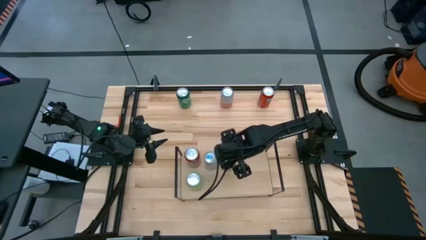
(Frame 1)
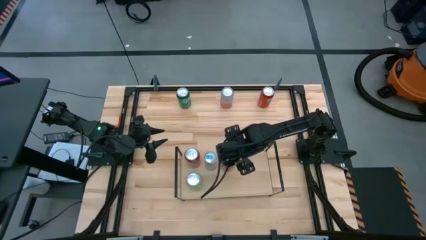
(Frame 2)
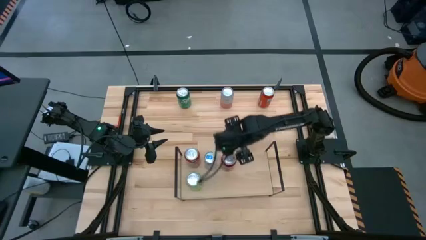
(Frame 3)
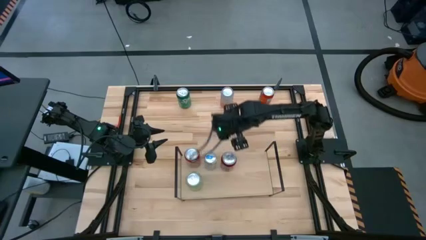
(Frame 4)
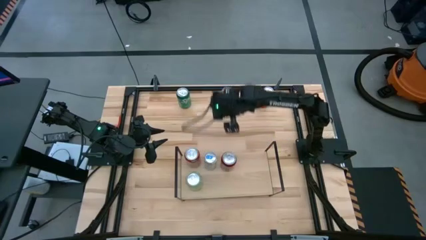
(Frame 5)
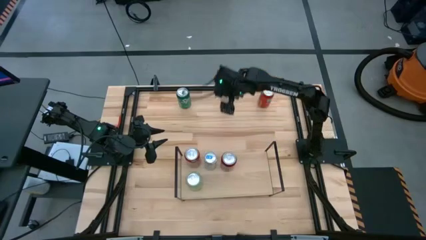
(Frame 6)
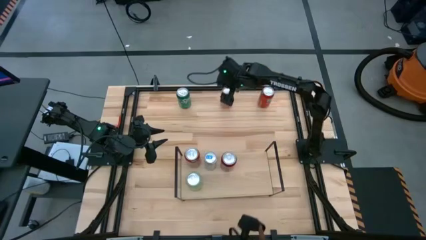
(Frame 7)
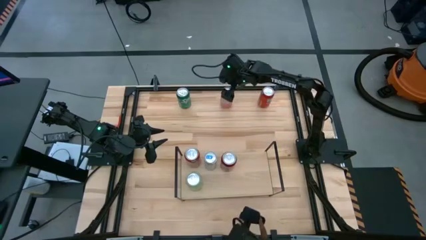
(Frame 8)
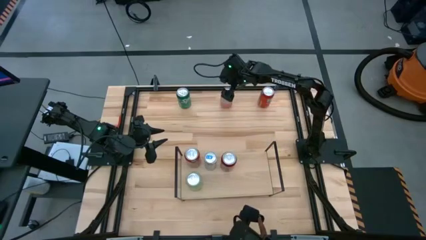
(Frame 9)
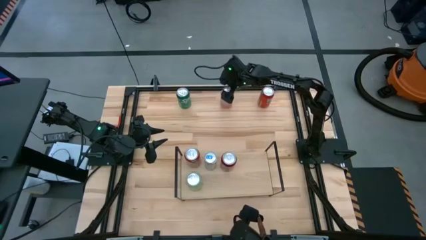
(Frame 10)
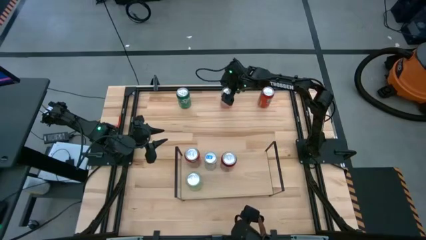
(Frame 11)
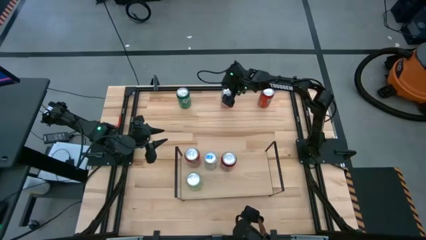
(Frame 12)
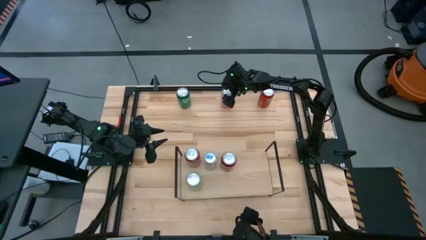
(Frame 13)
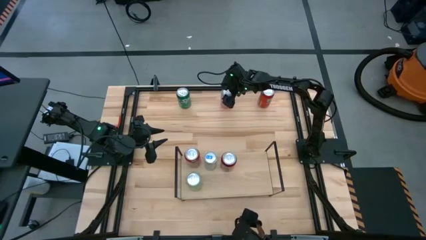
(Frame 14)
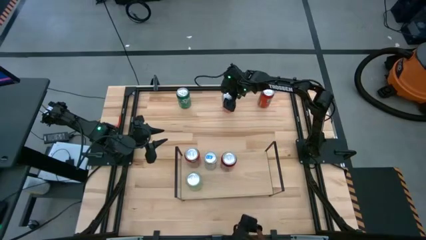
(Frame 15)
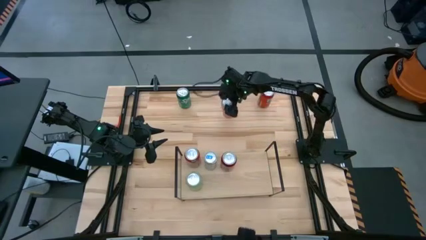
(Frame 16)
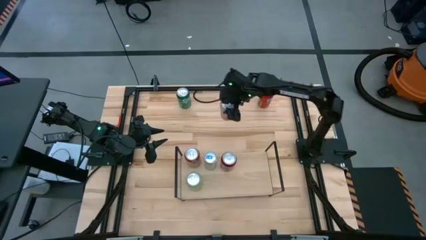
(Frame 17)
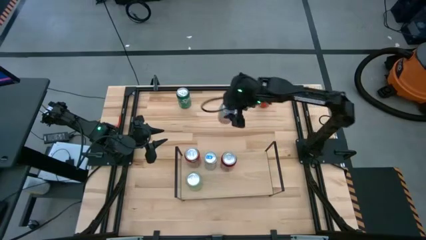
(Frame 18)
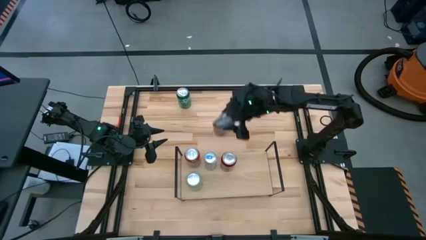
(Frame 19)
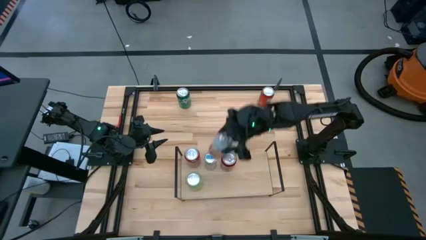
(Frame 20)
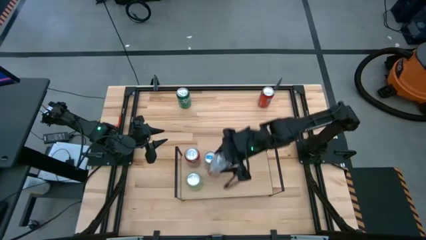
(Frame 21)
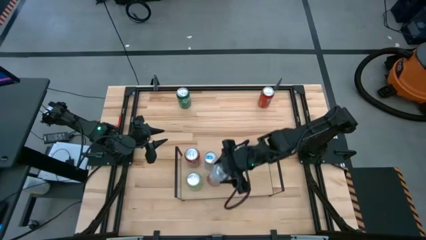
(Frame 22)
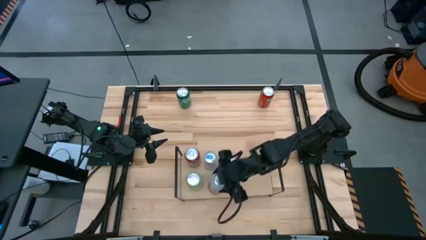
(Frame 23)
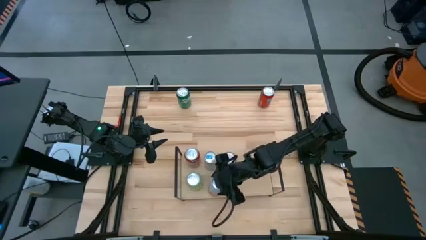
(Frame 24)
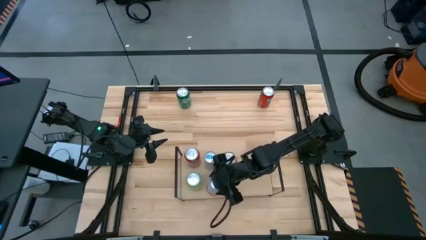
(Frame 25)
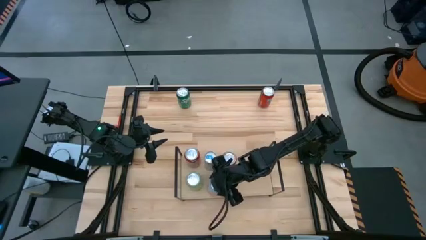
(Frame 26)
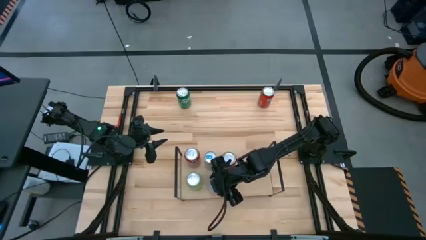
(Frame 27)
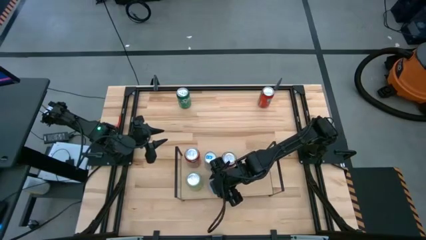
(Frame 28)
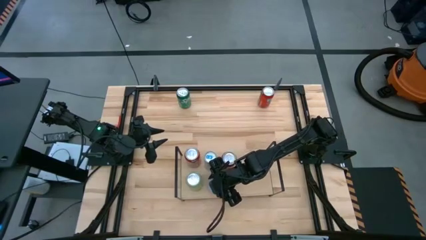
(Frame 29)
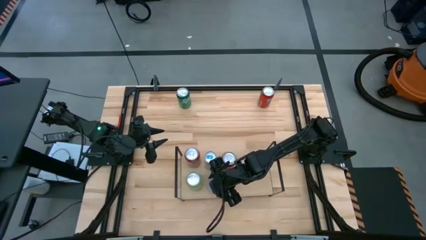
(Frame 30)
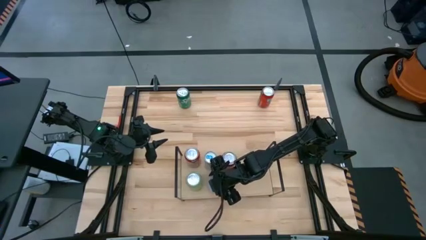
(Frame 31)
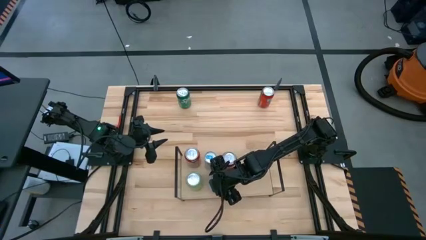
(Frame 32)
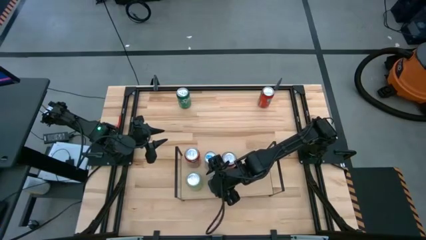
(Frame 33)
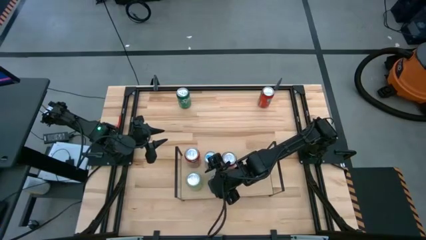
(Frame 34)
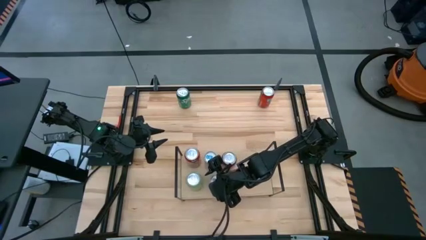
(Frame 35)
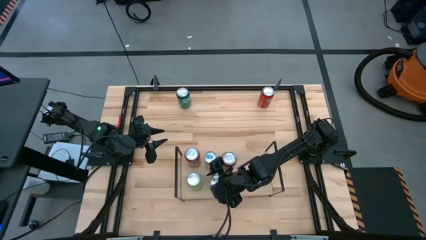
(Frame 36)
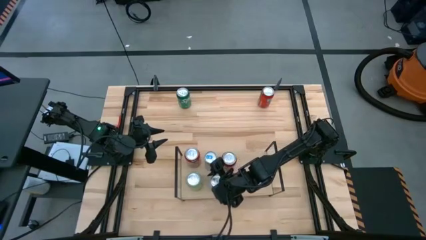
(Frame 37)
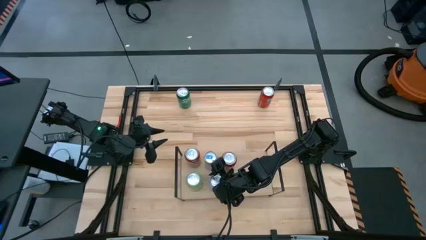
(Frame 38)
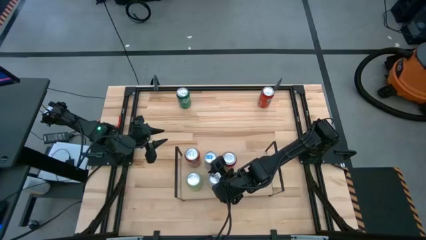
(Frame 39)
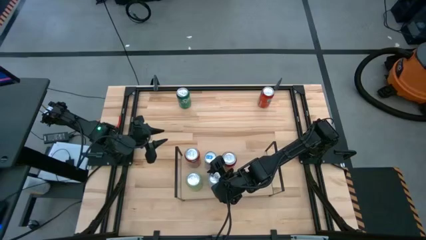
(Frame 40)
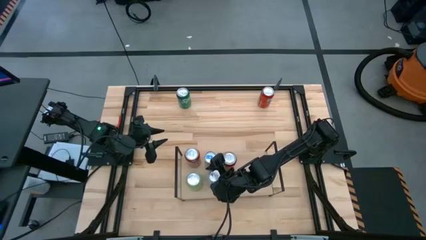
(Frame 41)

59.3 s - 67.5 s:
Task: Place canned beverage on shelf
Put the orange-white soda can on the shelf

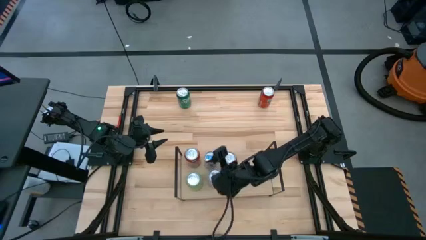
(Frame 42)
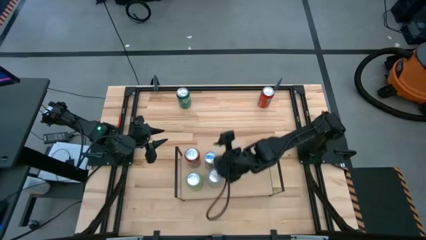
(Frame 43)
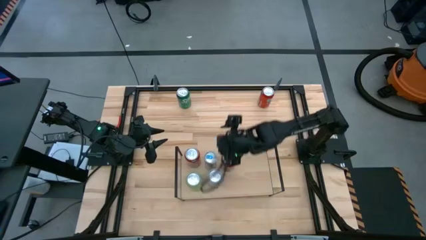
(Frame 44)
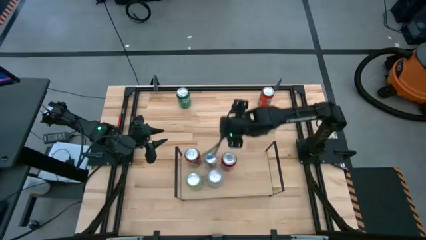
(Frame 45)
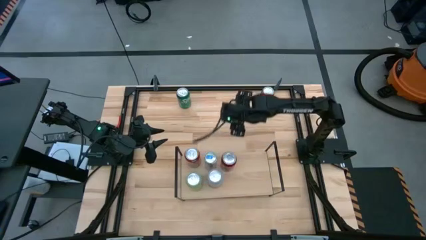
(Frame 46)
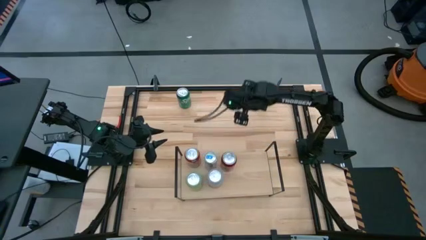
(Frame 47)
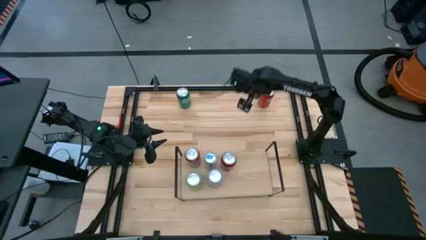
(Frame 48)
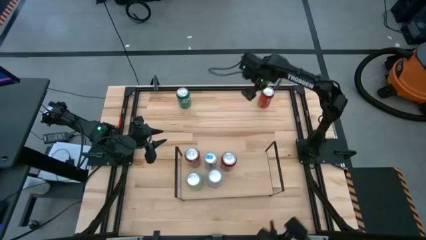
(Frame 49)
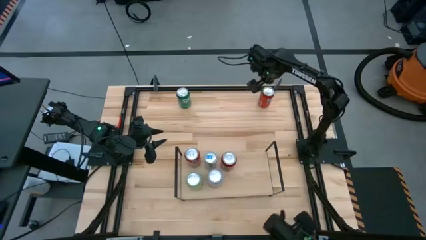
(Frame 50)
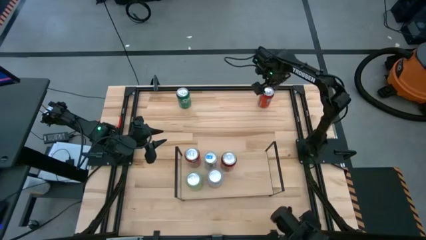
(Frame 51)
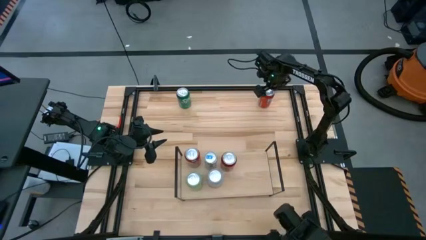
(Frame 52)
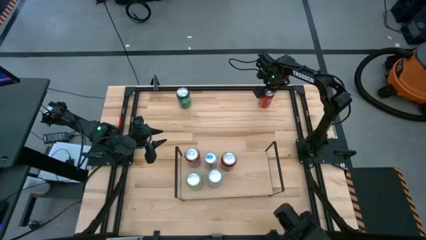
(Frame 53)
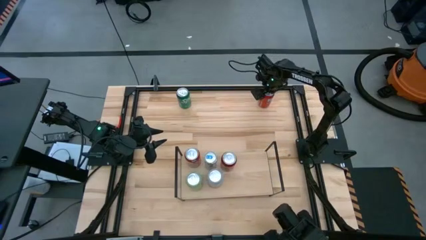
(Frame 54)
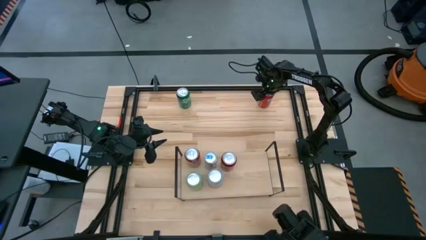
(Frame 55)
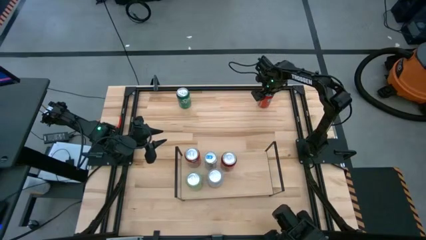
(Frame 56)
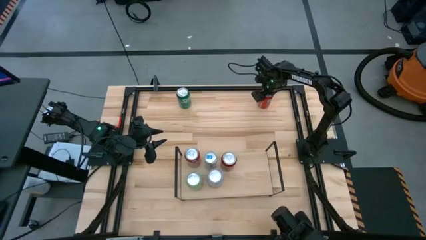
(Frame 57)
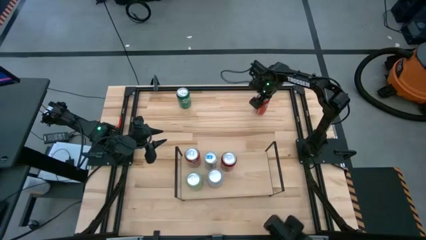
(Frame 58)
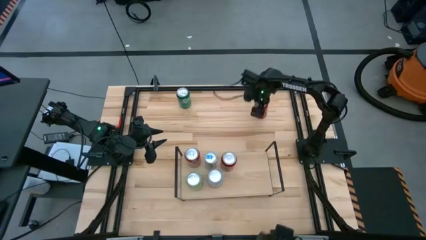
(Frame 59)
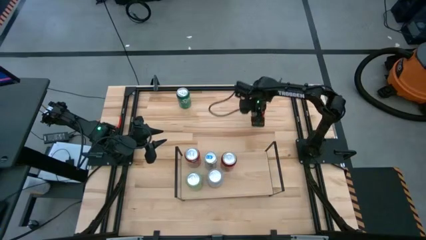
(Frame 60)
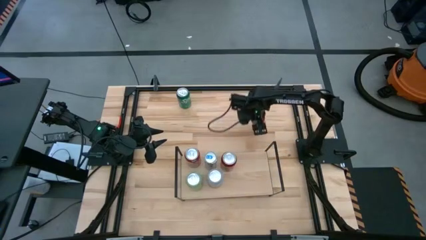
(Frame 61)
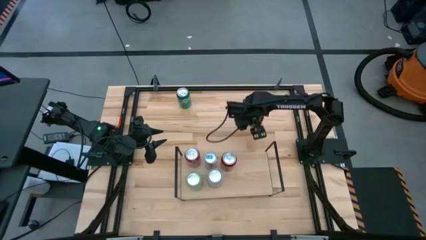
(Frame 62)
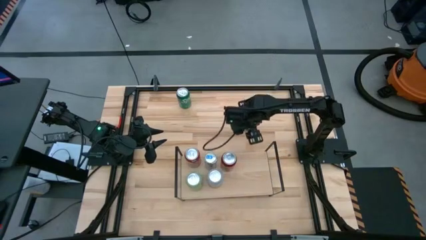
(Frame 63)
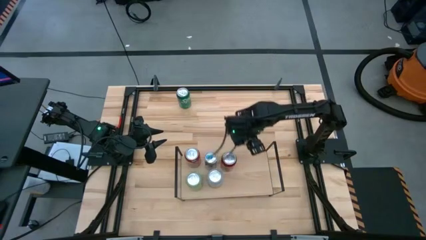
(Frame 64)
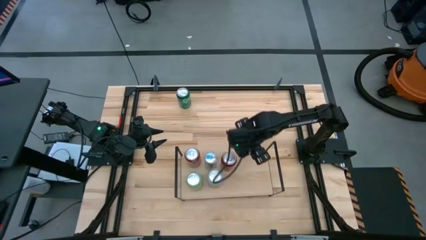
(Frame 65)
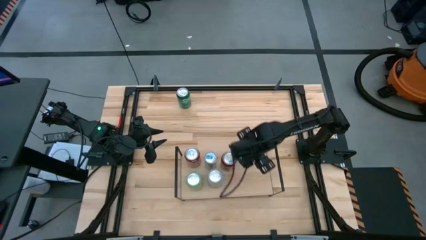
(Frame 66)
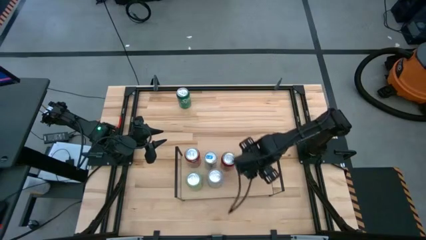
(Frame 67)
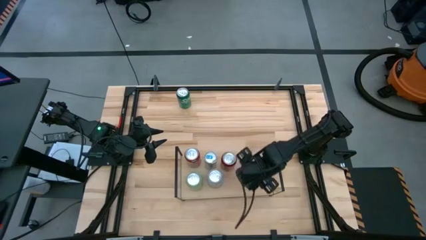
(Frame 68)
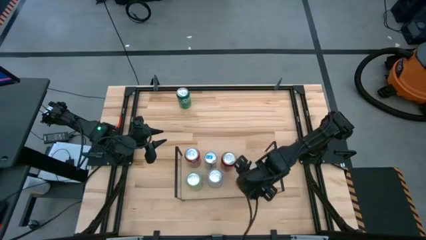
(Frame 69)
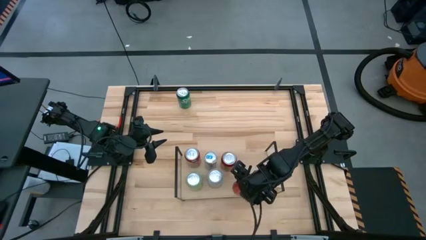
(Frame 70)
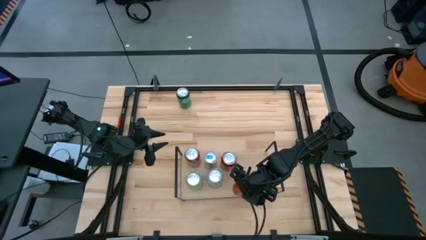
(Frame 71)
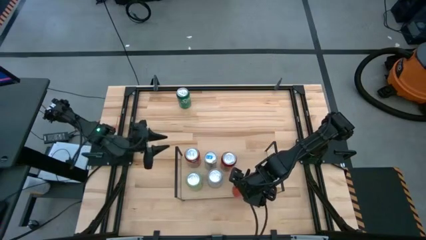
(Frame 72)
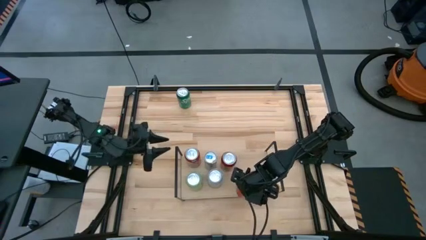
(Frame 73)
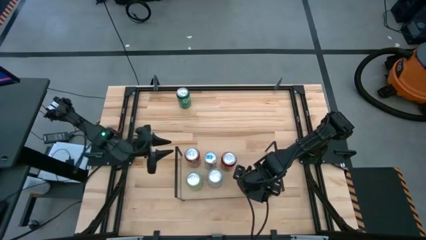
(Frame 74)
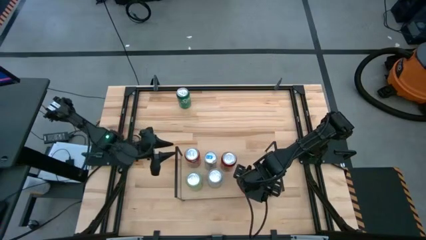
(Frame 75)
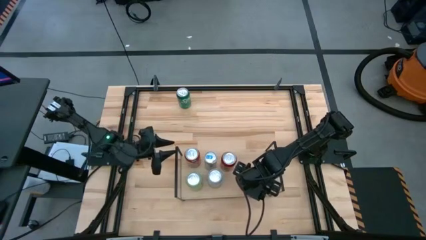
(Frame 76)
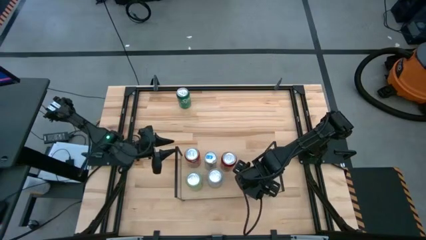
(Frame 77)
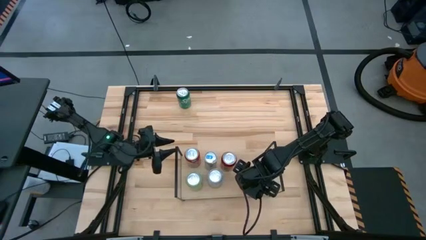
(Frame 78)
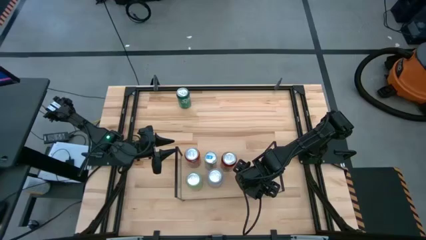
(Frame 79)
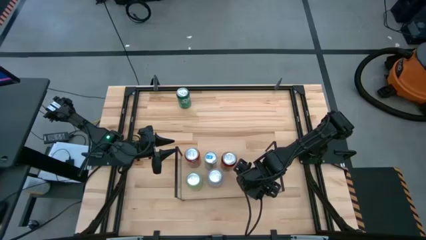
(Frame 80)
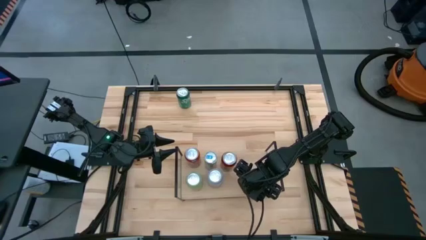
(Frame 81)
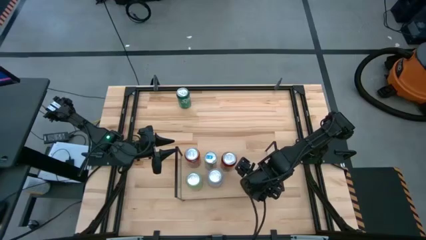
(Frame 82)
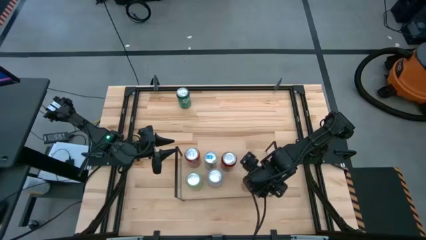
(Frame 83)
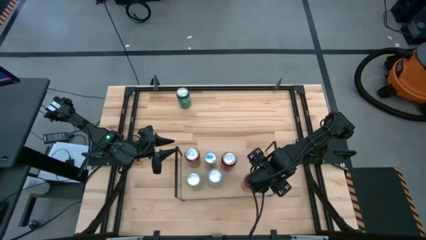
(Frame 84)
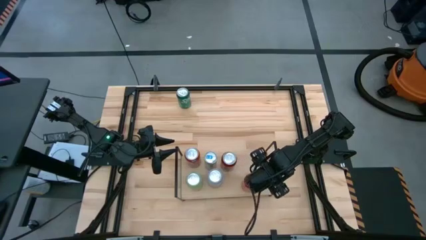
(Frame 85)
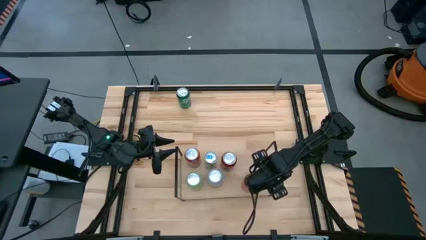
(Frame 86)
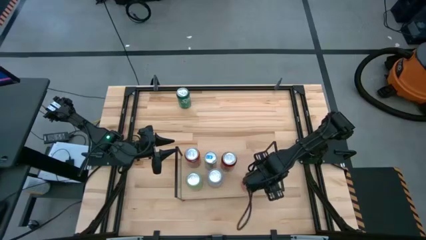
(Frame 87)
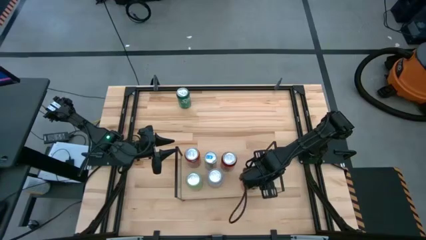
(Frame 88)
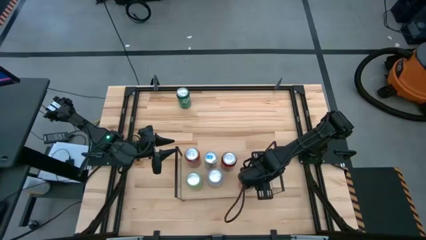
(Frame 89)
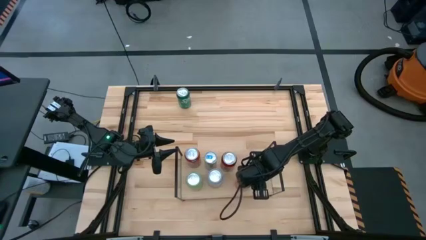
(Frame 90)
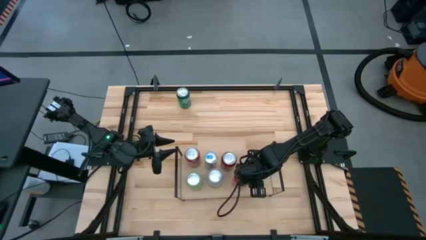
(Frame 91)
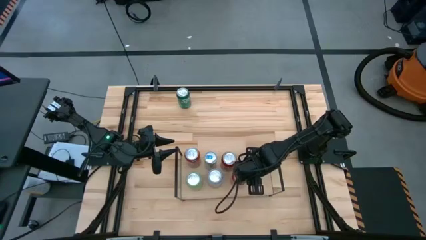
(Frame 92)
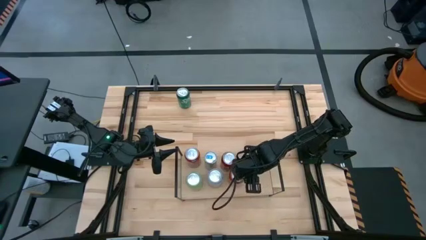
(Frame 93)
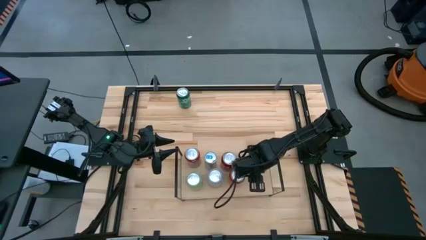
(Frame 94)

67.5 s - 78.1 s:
Put the orange soda can on the shelf
